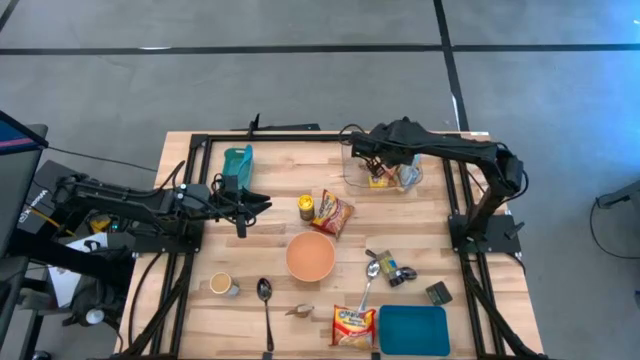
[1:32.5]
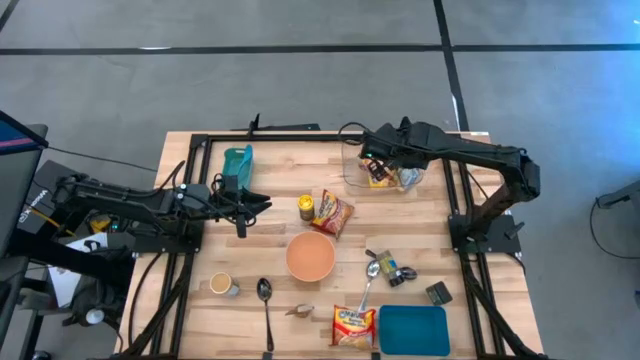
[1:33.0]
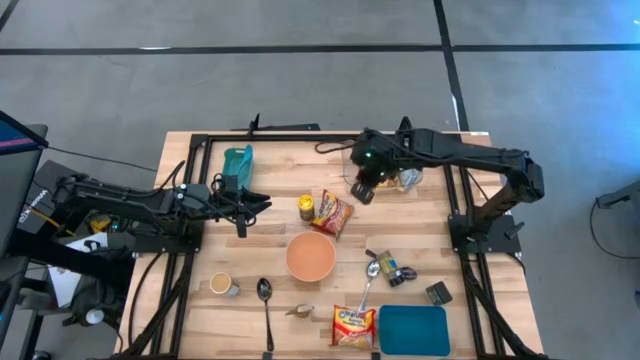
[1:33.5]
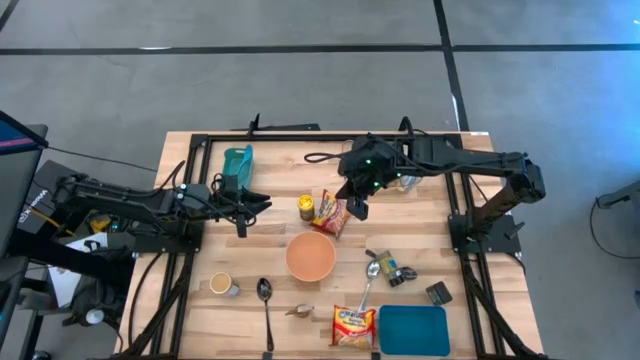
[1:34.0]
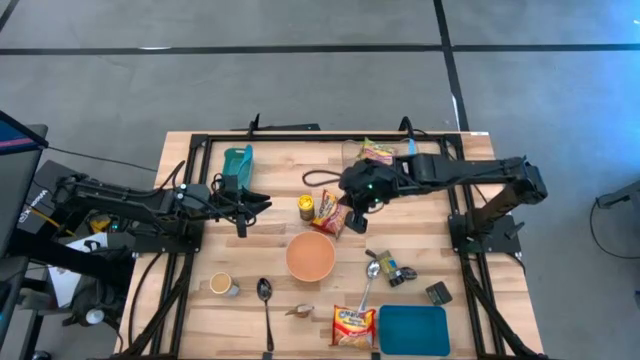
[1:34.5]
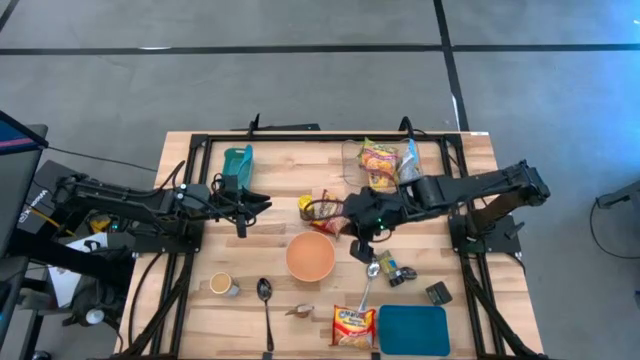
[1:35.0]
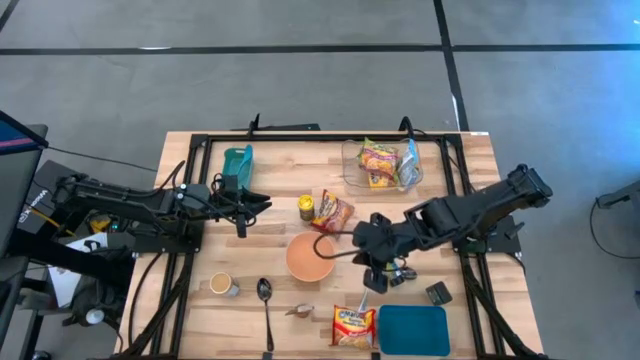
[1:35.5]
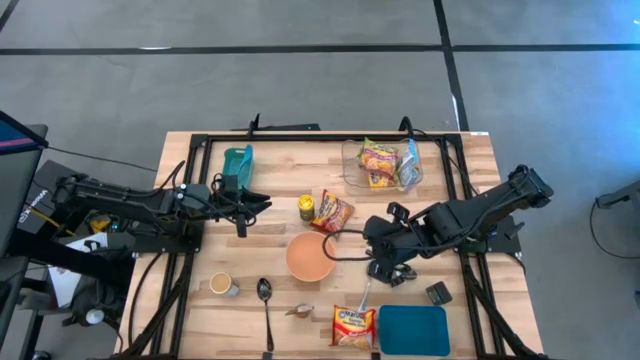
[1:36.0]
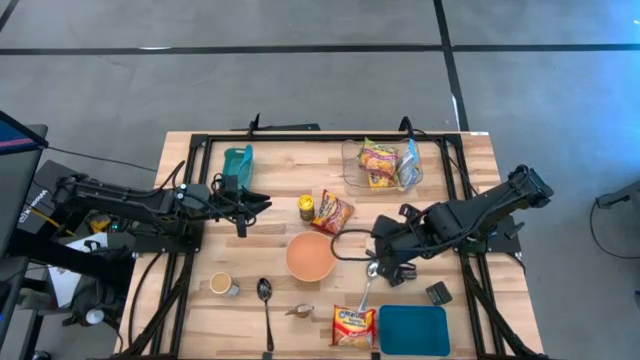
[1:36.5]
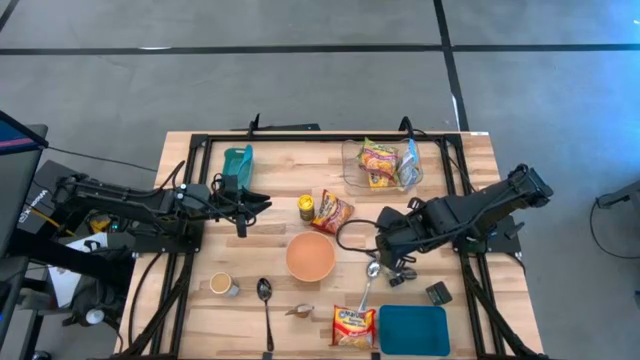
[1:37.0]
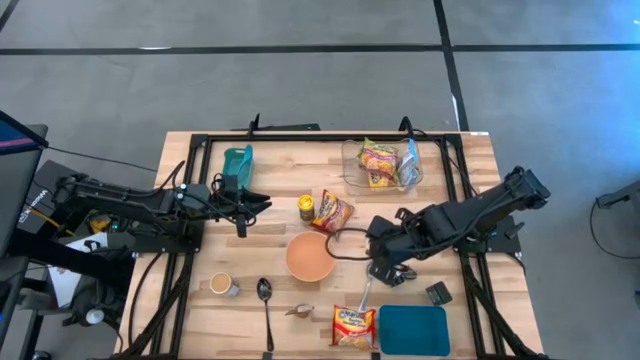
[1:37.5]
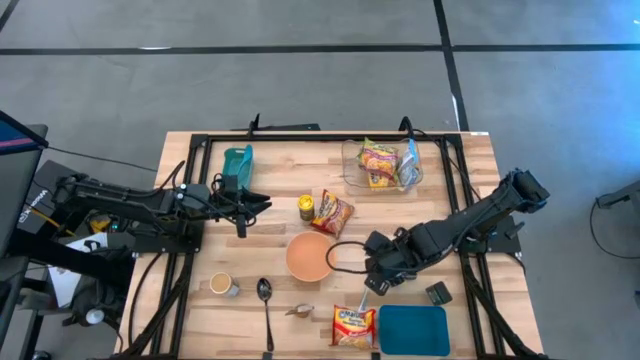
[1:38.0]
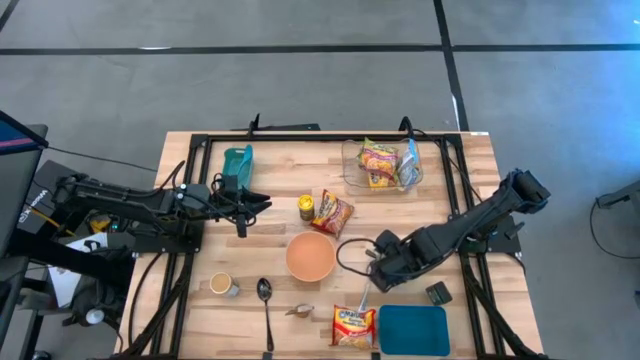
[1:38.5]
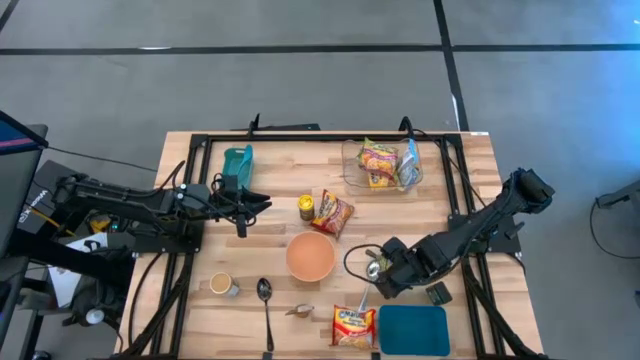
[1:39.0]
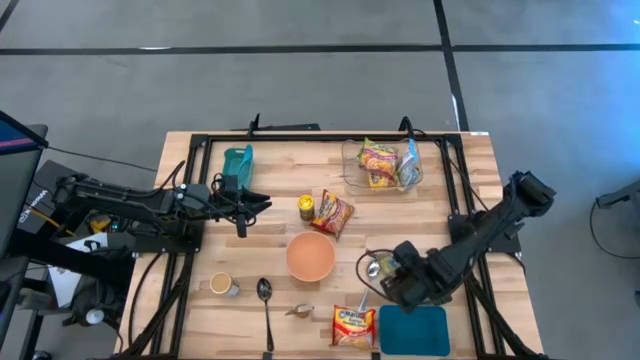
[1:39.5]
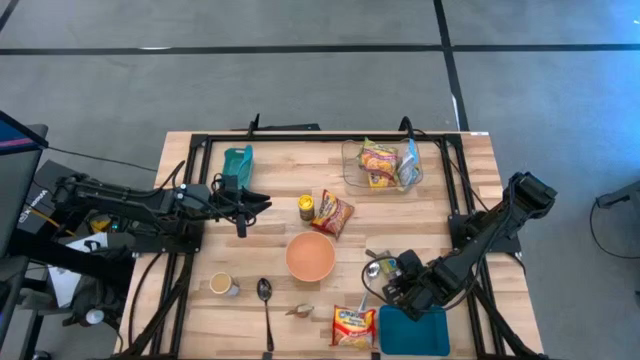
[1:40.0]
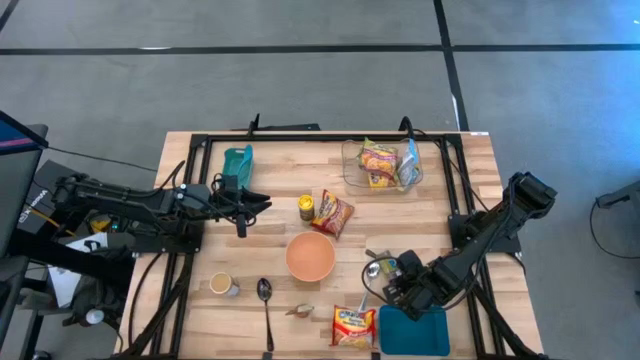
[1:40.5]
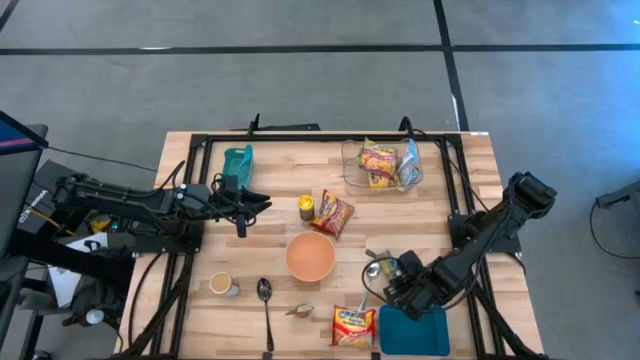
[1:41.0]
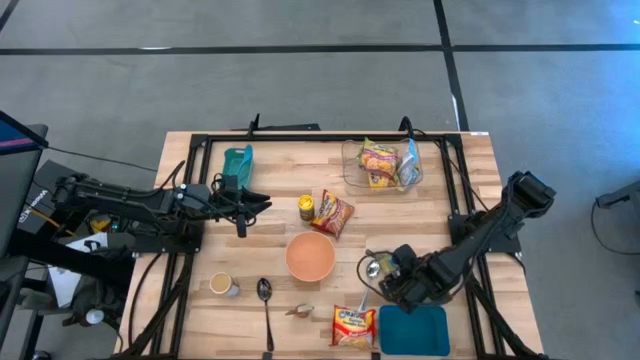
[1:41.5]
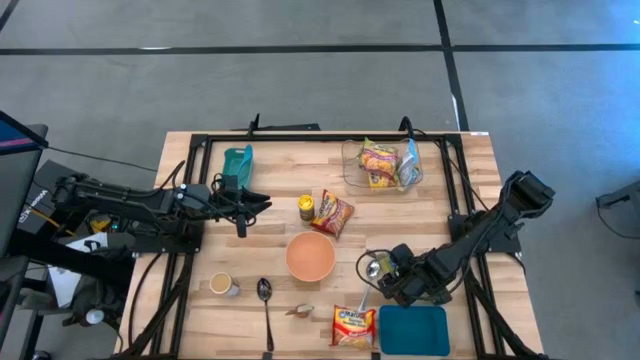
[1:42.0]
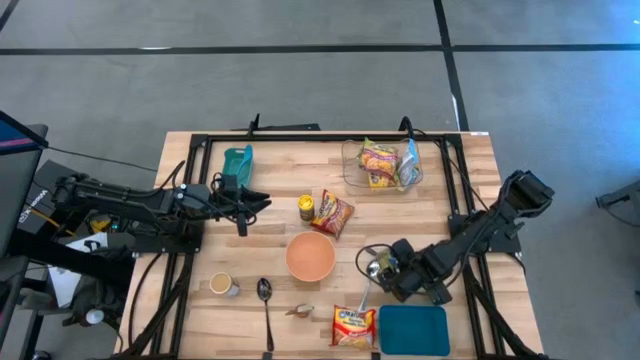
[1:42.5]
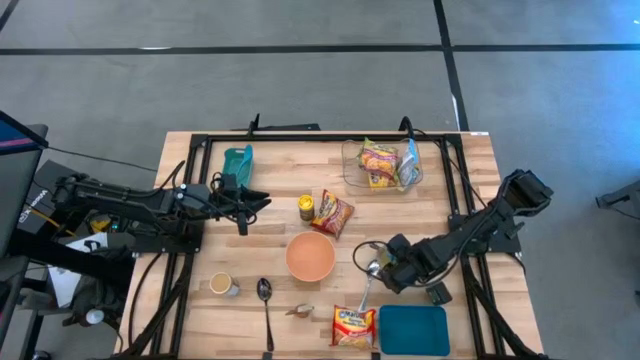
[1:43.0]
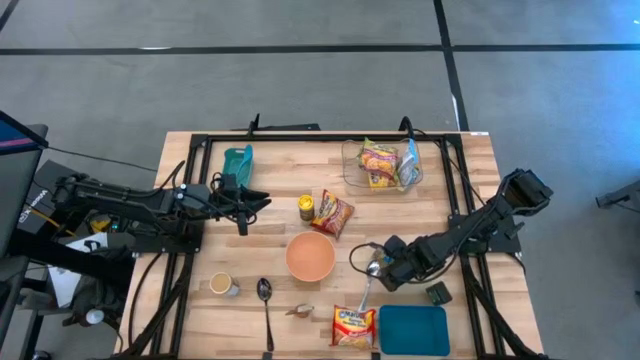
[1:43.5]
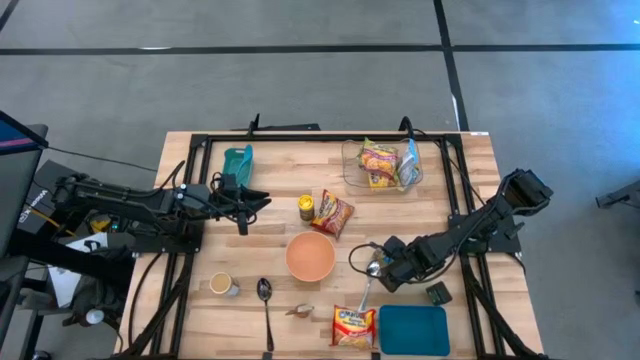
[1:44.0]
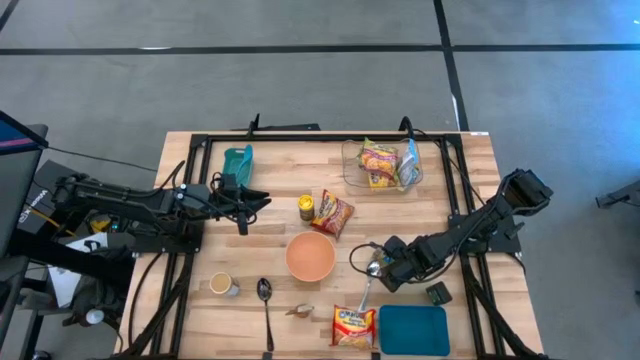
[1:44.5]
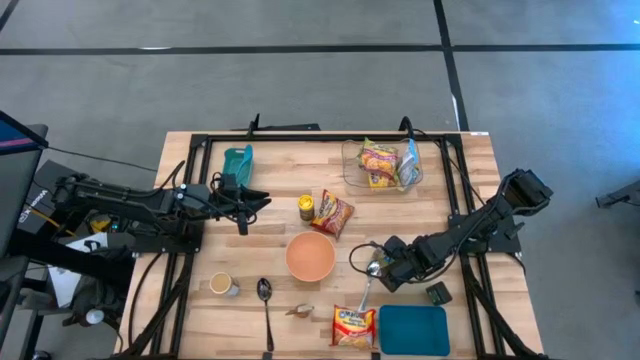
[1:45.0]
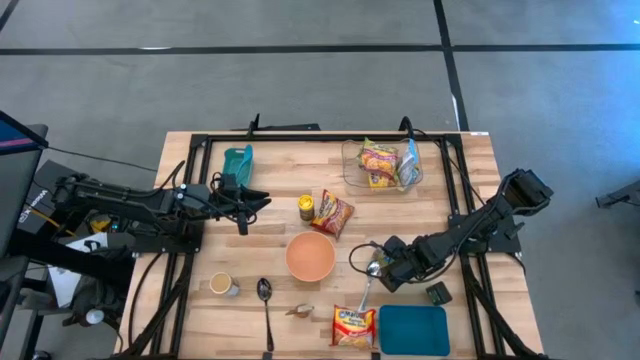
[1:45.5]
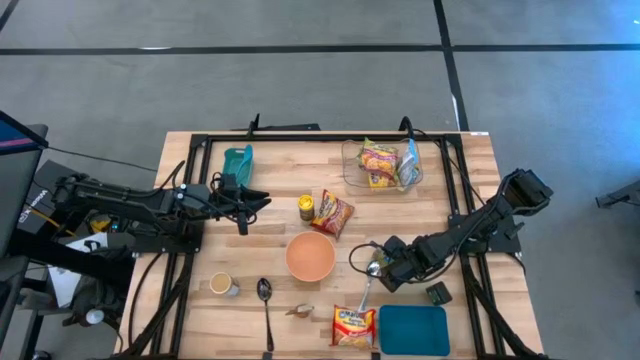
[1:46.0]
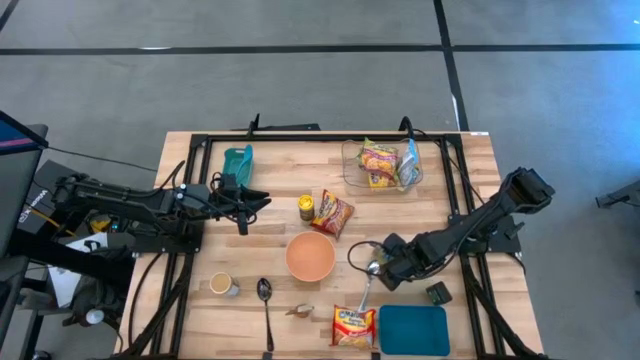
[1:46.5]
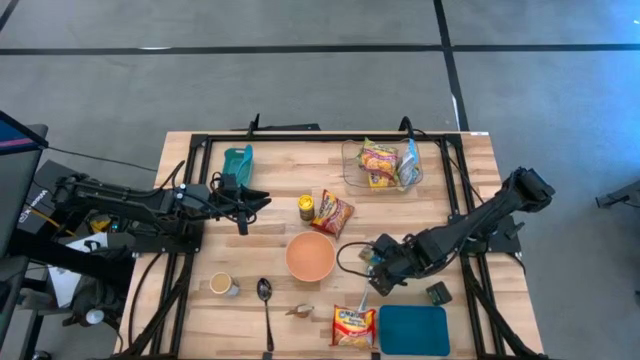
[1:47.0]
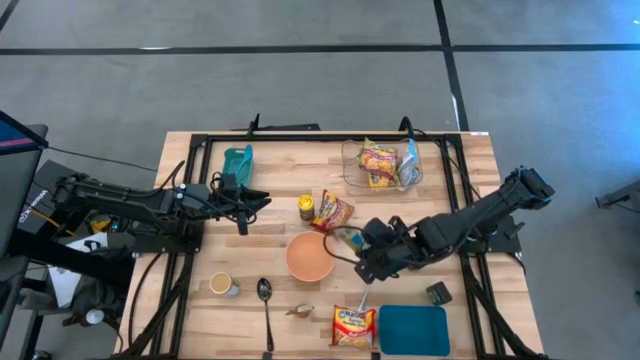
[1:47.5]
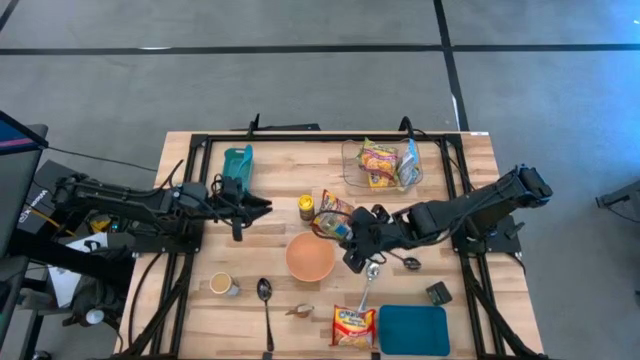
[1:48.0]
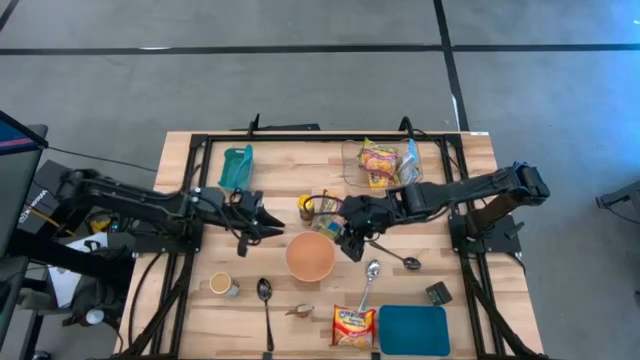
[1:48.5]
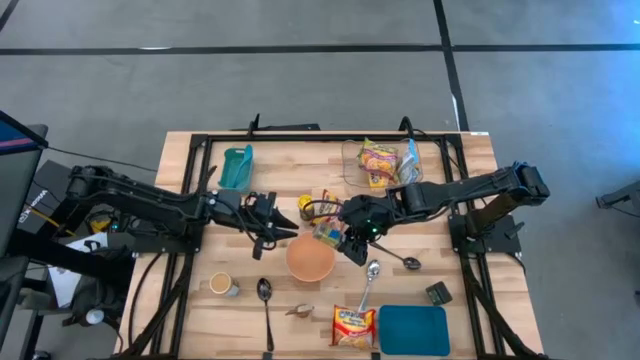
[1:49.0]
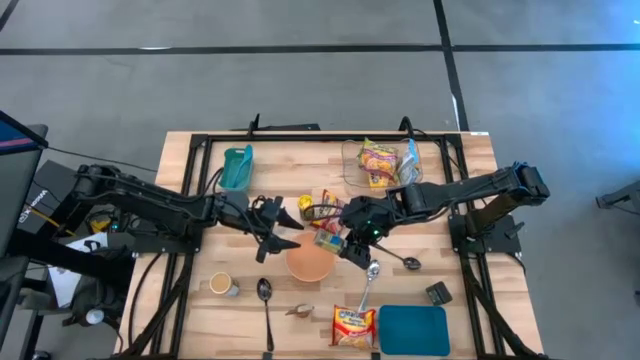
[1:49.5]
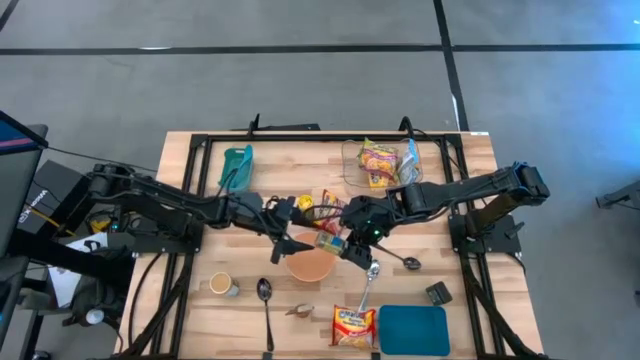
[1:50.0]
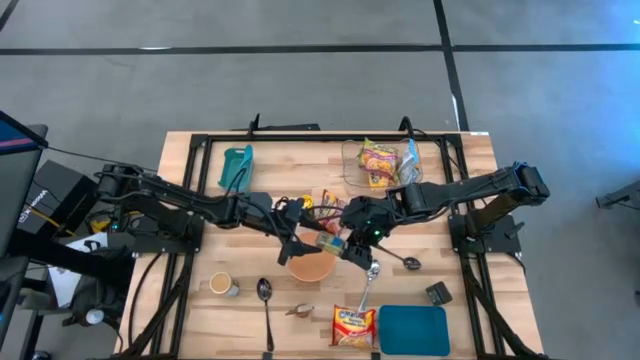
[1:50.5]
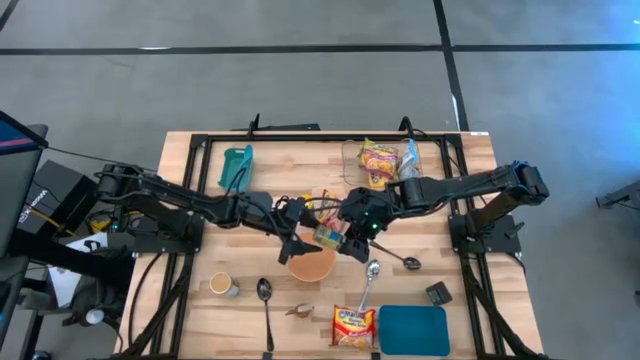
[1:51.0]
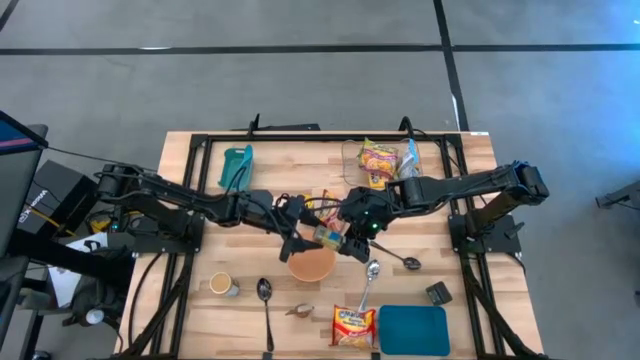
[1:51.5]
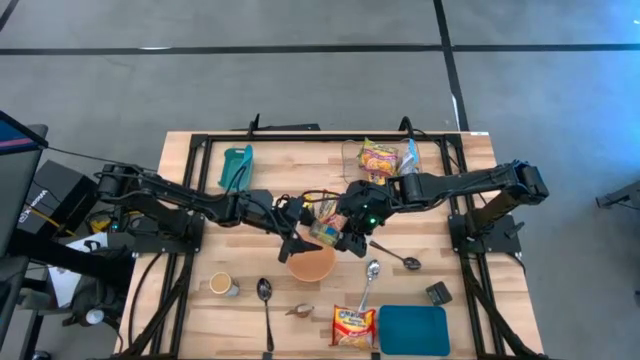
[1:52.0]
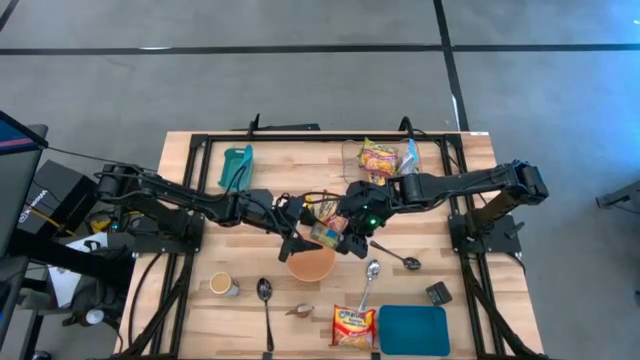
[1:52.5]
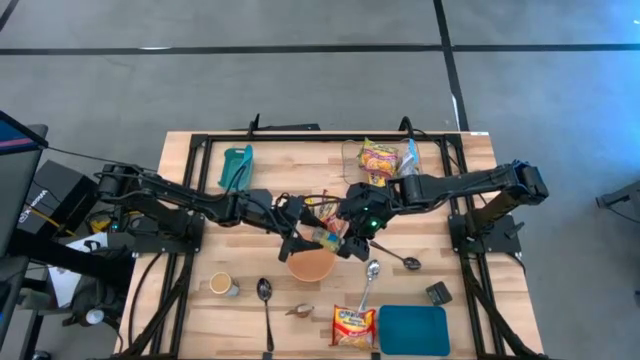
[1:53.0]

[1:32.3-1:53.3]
Task: Pick & Place Food Item
Put the black seasoning bottle into the dark blue bin

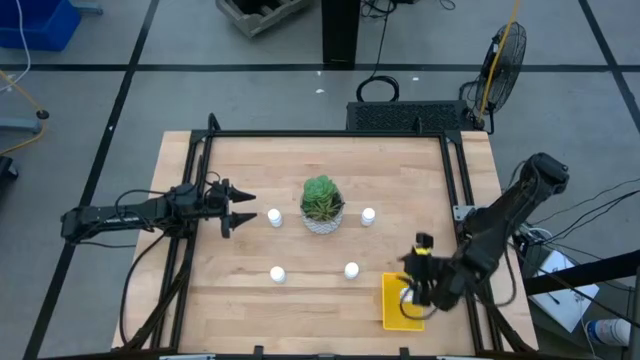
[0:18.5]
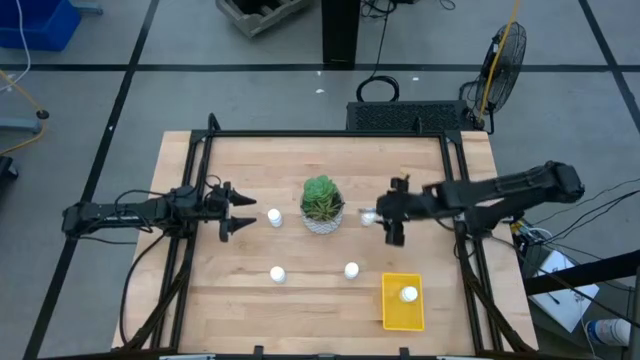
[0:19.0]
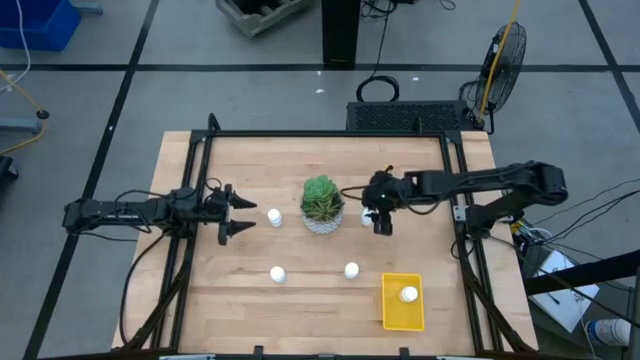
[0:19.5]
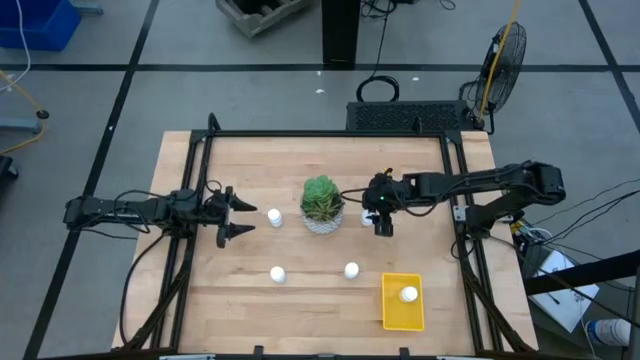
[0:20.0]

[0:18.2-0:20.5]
Task: Pick and place pill bottles into a basket
Put the white pill bottle into the bin
